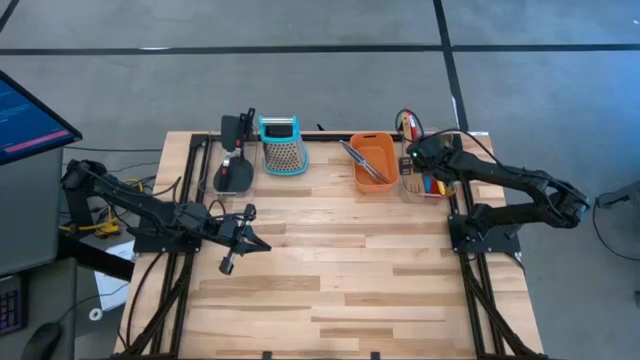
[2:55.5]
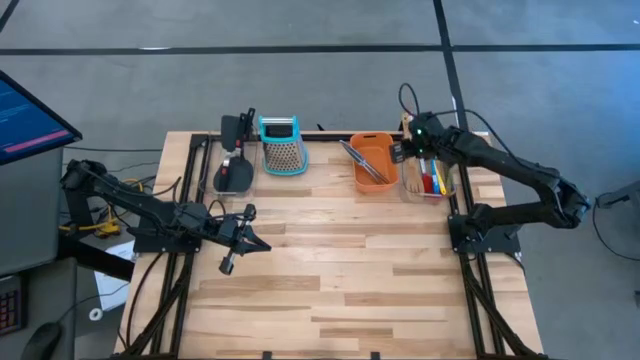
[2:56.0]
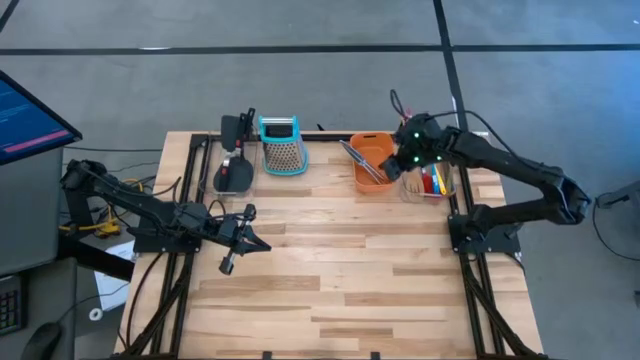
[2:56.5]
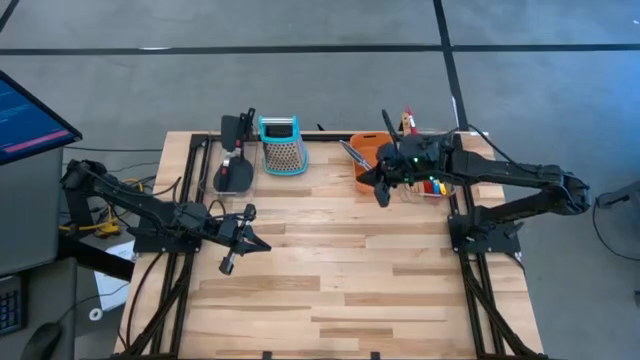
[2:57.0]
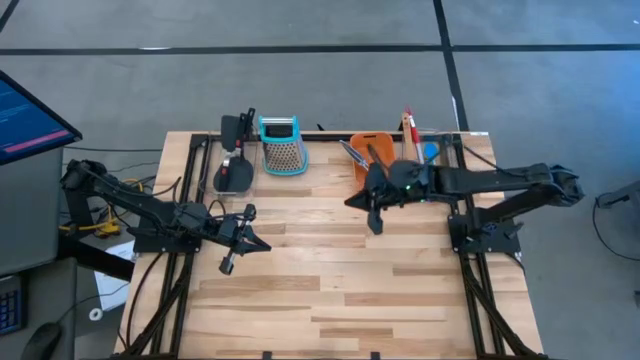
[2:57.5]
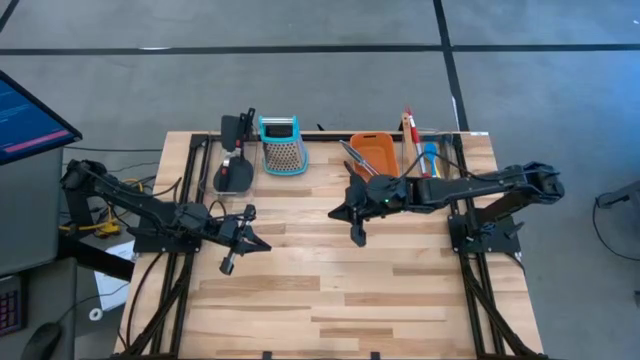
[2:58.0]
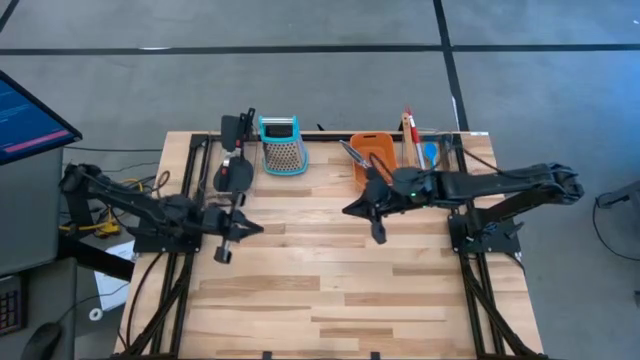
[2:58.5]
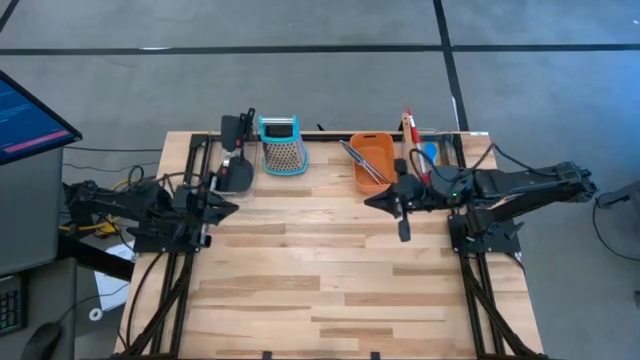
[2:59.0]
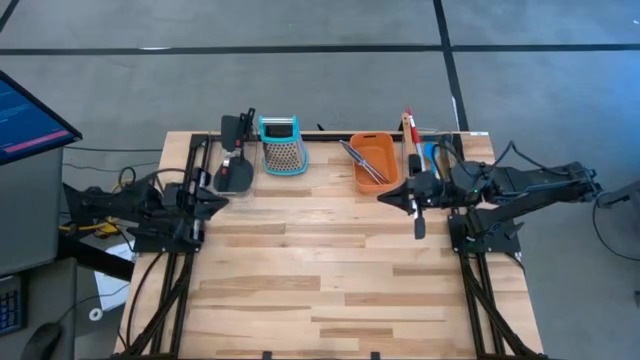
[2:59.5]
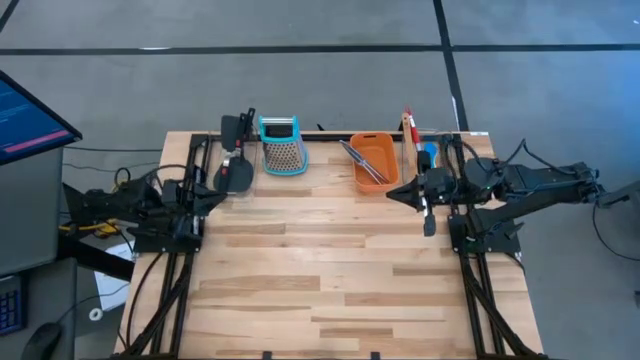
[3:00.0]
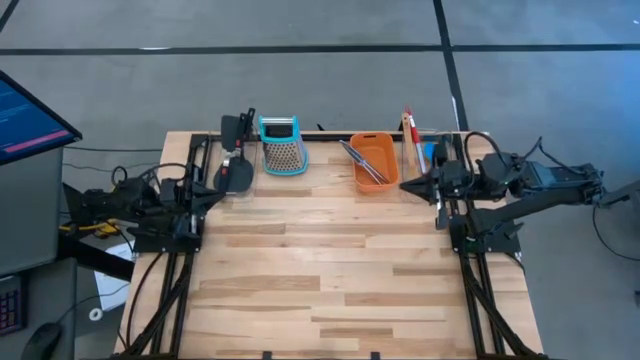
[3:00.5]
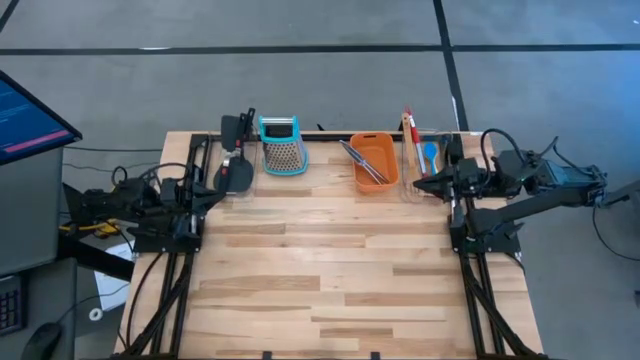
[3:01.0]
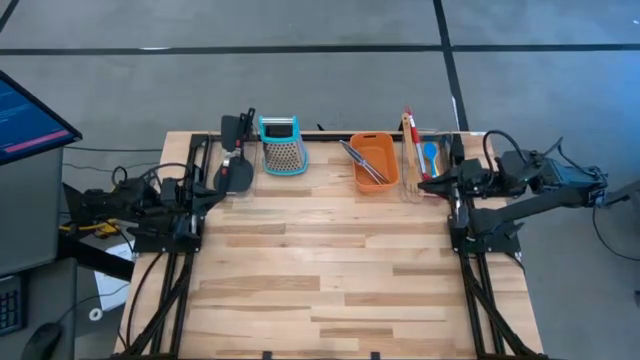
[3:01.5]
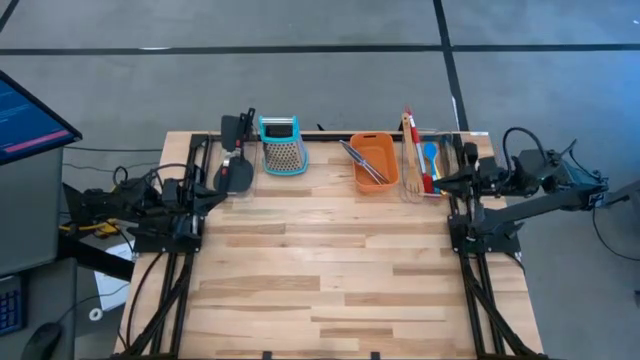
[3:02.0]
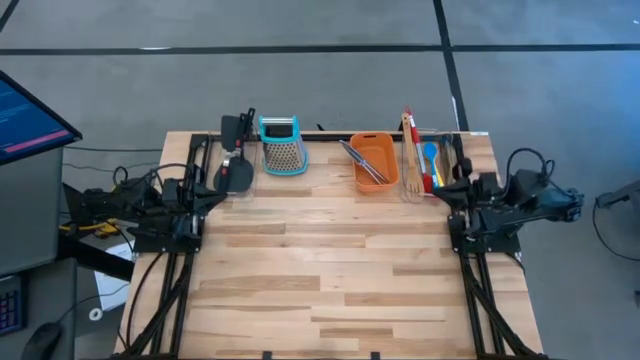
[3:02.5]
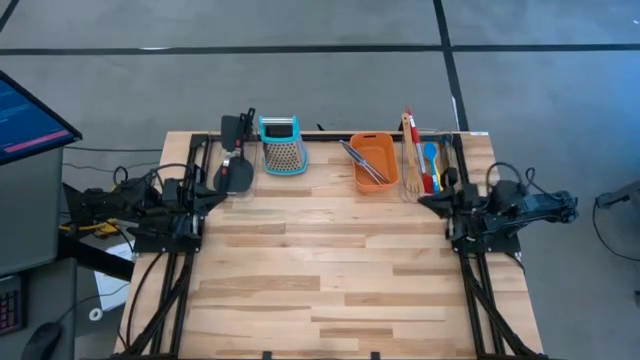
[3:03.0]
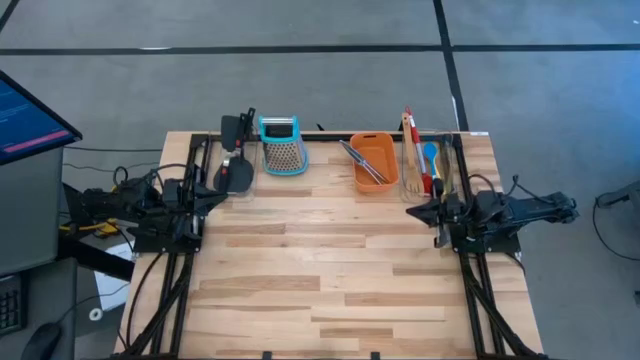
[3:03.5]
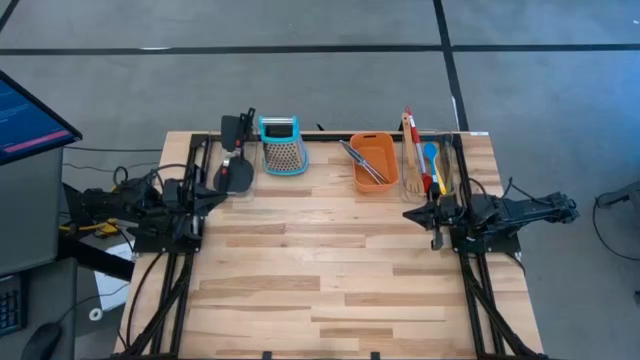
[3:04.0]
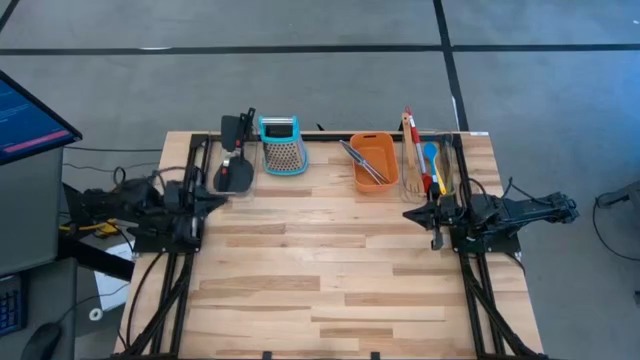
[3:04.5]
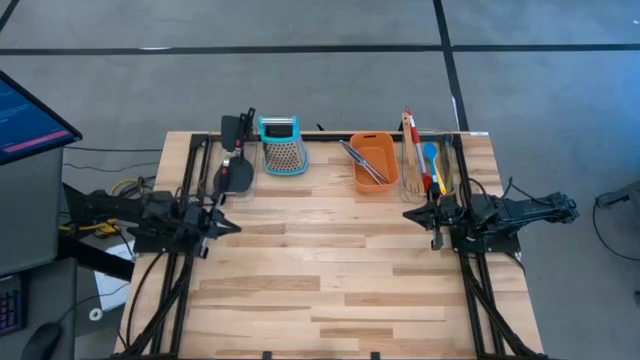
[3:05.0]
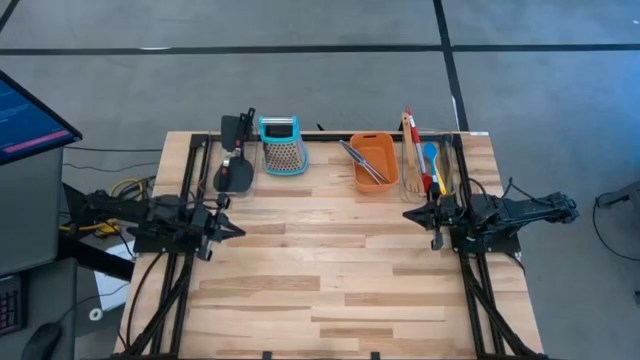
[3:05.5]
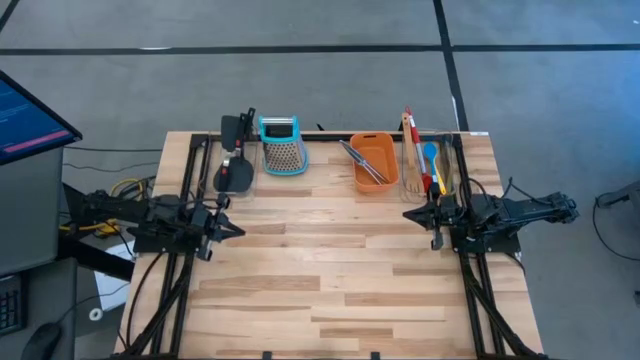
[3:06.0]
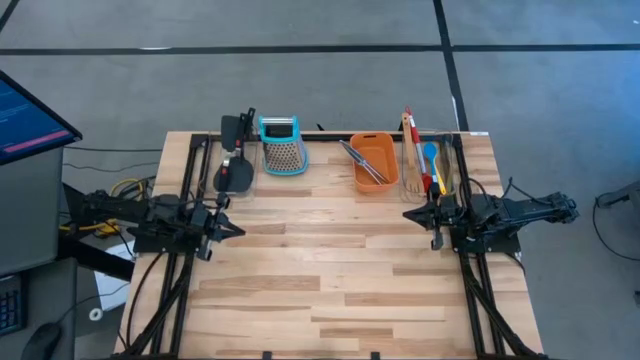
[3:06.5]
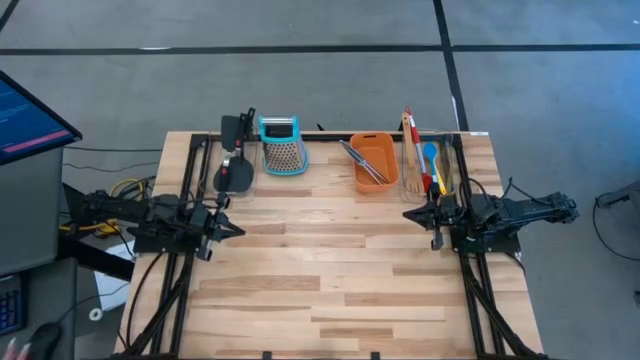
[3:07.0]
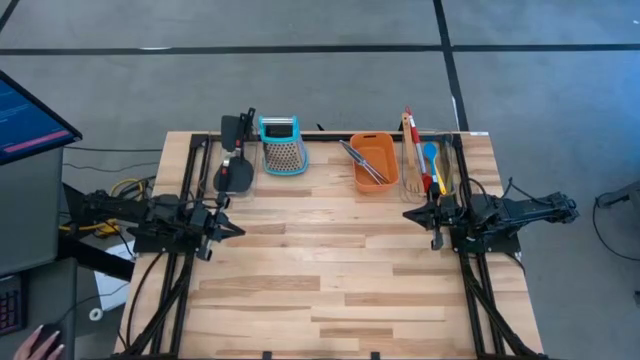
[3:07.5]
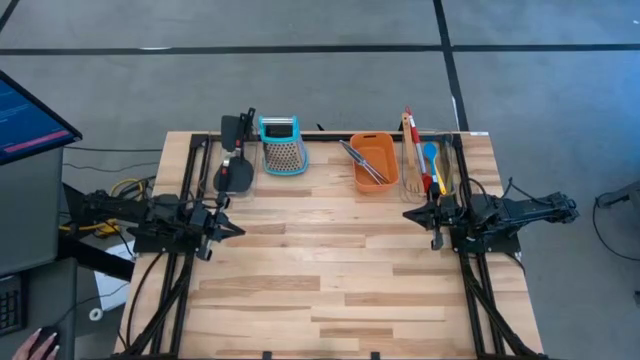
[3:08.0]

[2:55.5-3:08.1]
Task: Pick & Place Kitchen Items
Return to Home Position

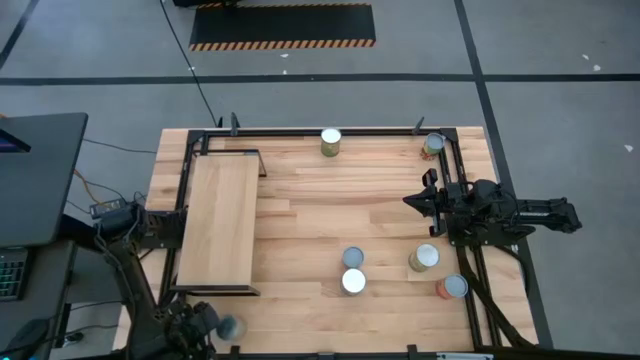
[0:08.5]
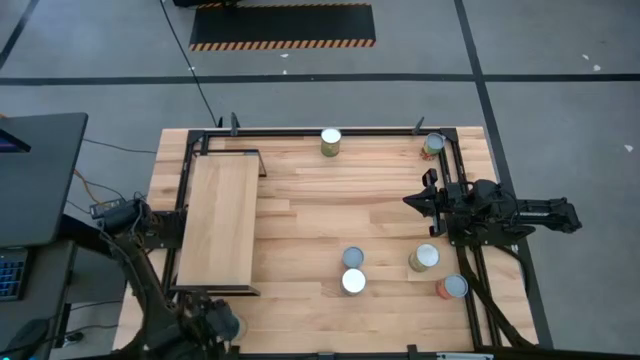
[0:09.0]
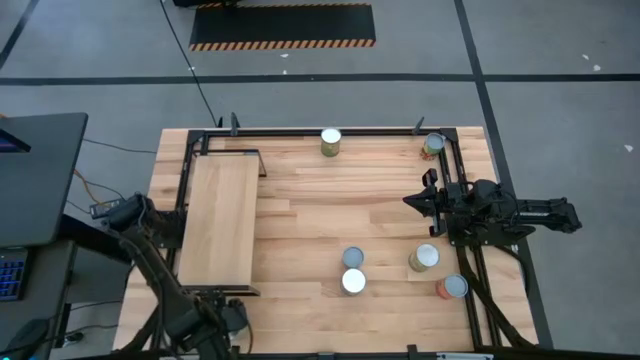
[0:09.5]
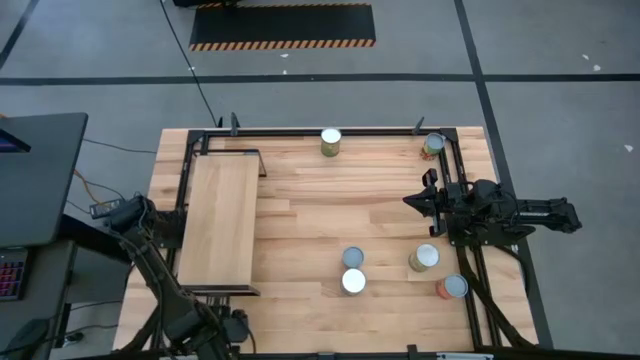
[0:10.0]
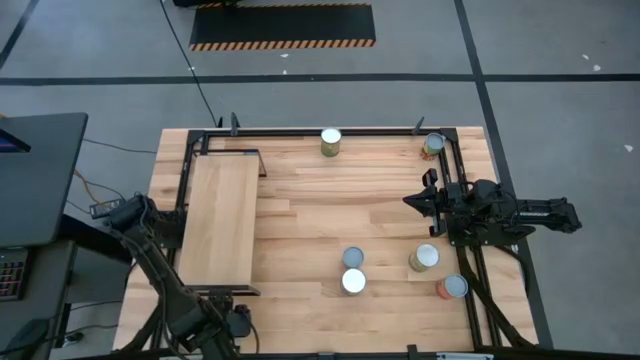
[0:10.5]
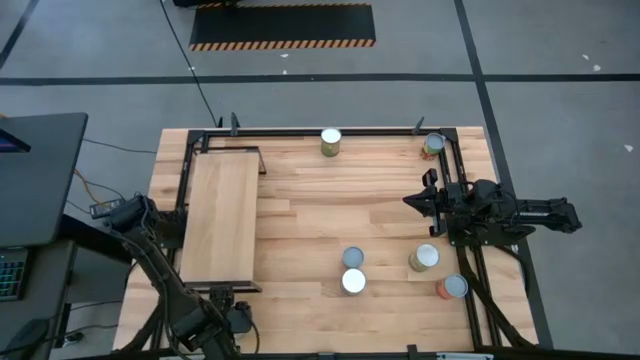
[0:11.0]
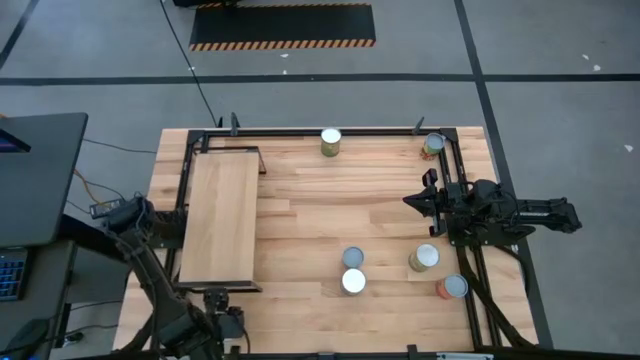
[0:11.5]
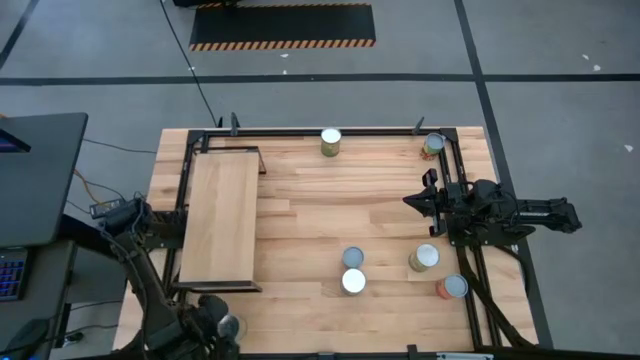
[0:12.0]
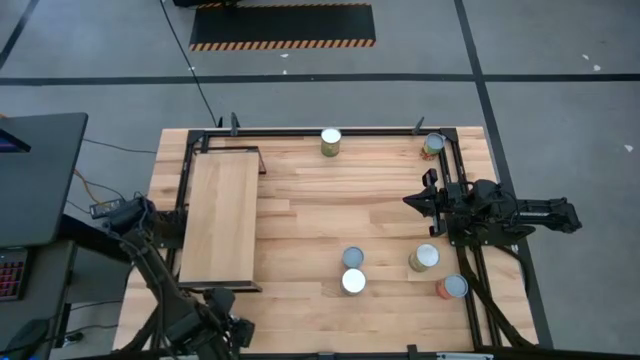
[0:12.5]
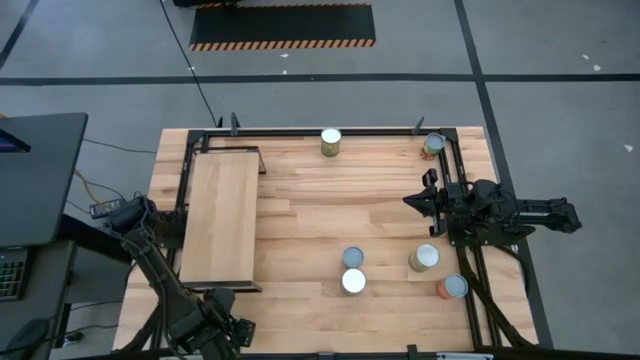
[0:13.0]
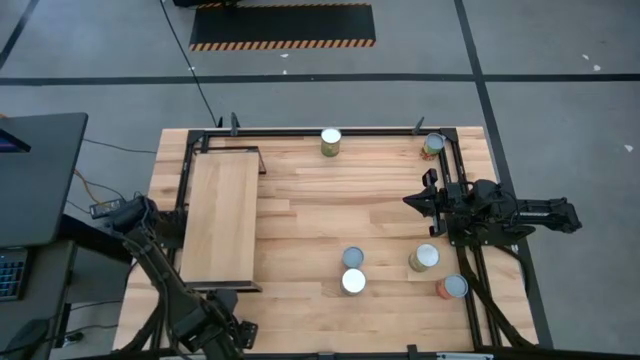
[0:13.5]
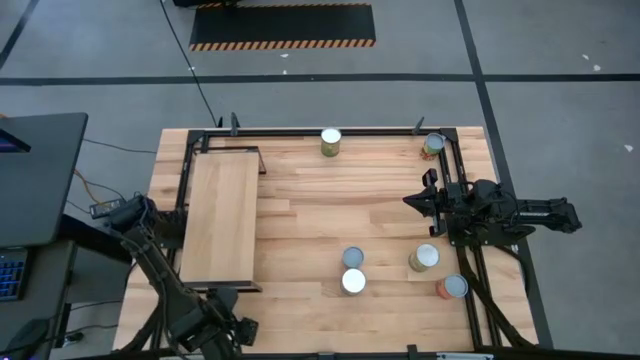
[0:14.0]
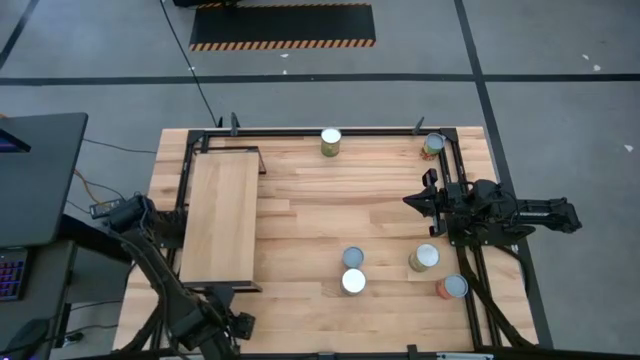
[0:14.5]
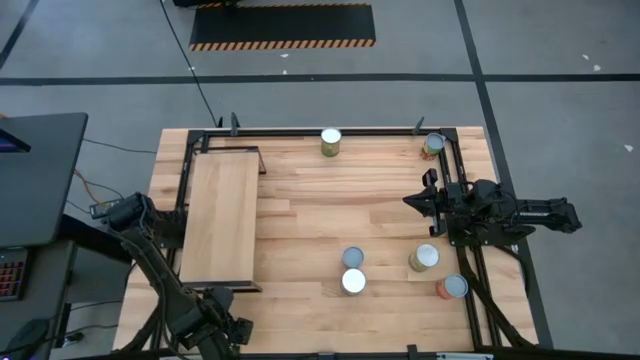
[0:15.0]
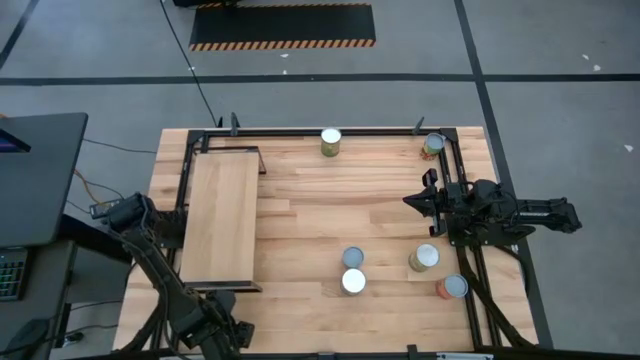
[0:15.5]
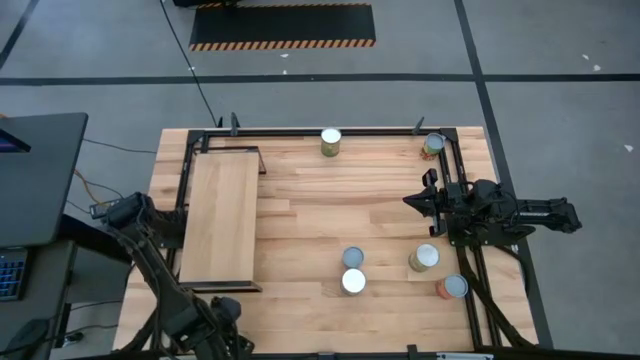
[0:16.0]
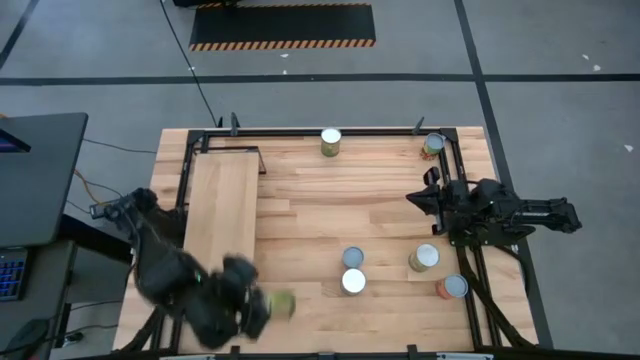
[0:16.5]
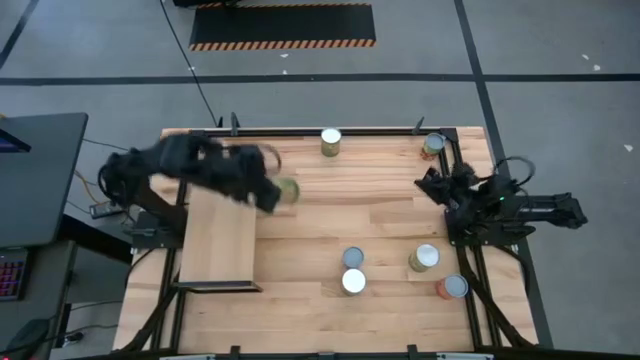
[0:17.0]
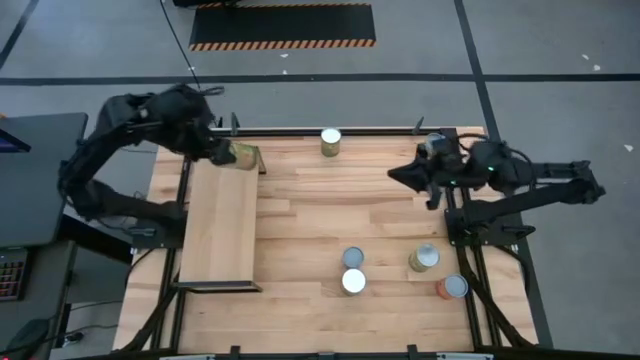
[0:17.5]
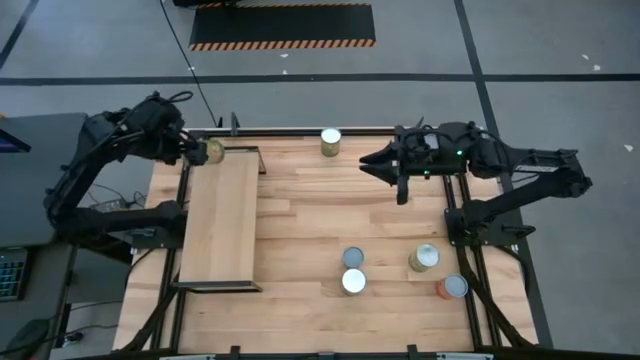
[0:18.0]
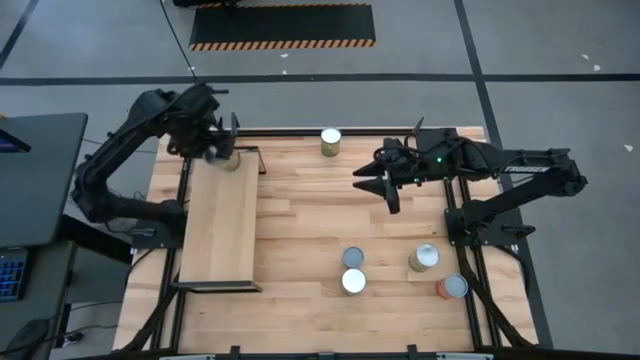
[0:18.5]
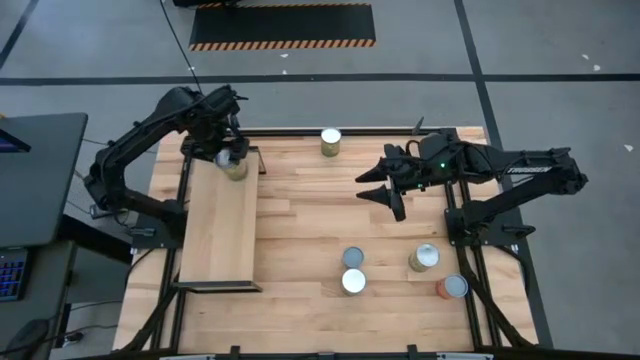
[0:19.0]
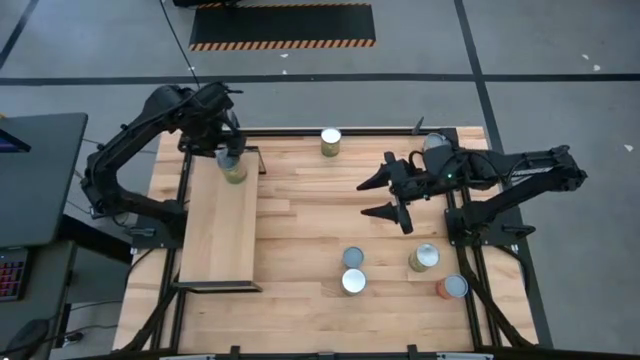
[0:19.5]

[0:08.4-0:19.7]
Task: Pick and place cans onto a shelf
Put the bottom large canned oranges on the shelf
